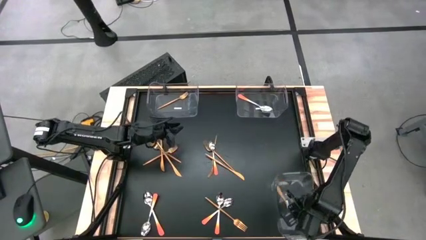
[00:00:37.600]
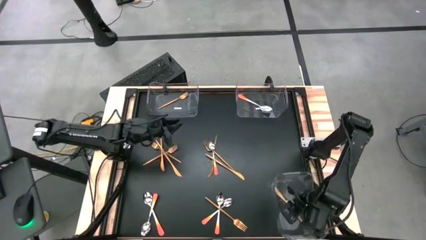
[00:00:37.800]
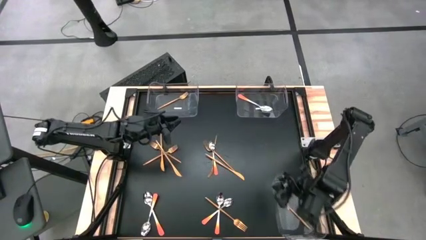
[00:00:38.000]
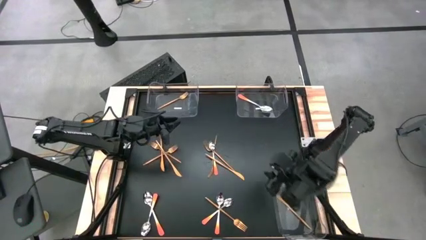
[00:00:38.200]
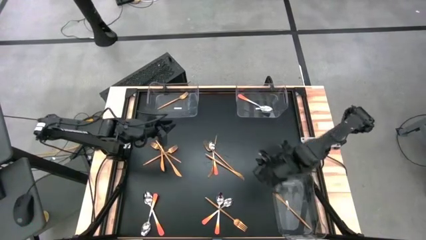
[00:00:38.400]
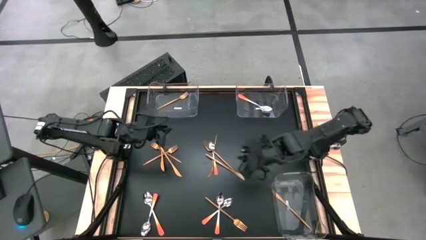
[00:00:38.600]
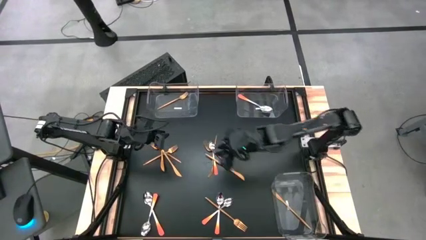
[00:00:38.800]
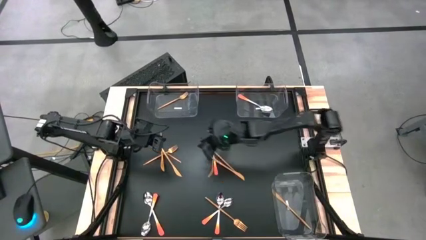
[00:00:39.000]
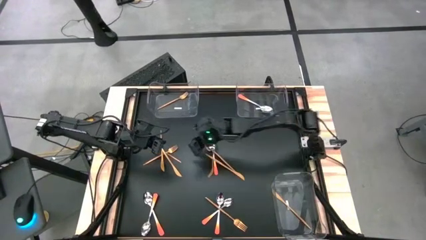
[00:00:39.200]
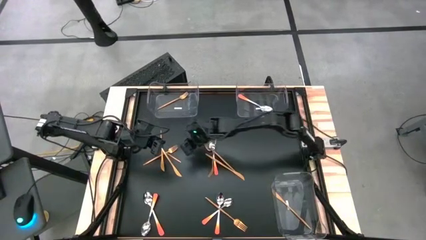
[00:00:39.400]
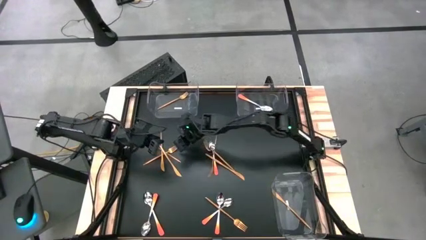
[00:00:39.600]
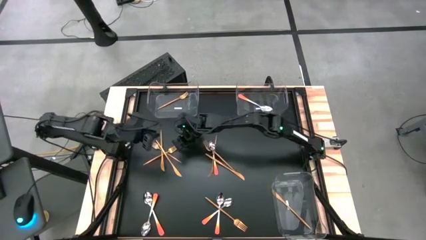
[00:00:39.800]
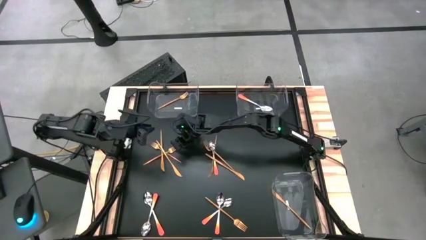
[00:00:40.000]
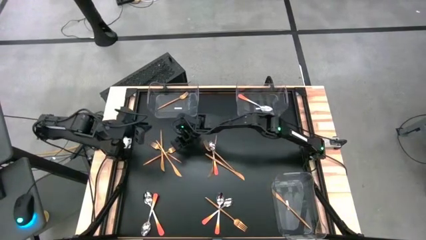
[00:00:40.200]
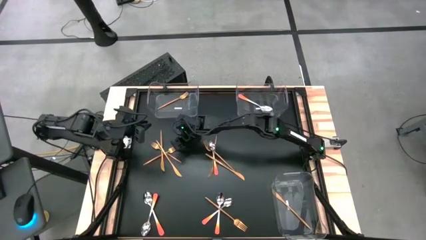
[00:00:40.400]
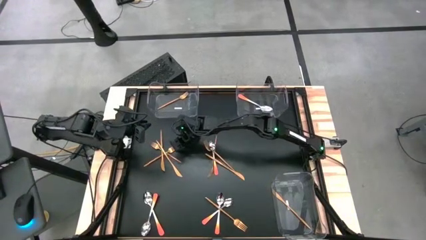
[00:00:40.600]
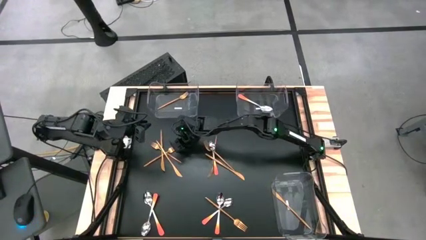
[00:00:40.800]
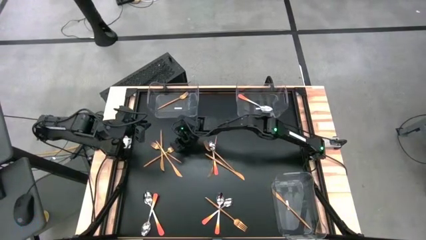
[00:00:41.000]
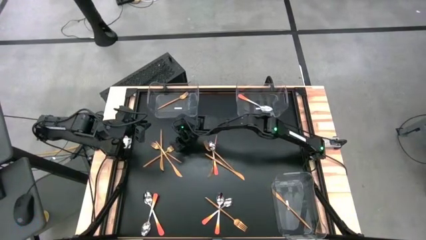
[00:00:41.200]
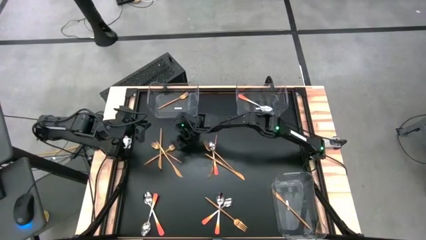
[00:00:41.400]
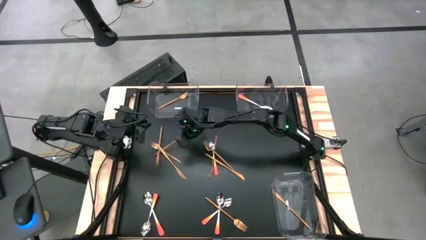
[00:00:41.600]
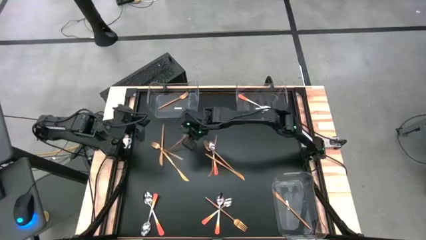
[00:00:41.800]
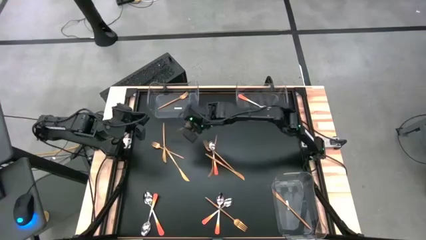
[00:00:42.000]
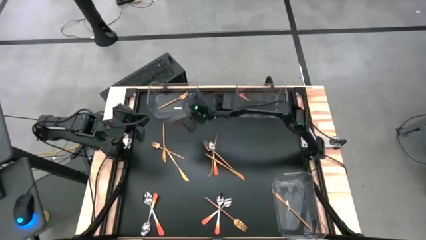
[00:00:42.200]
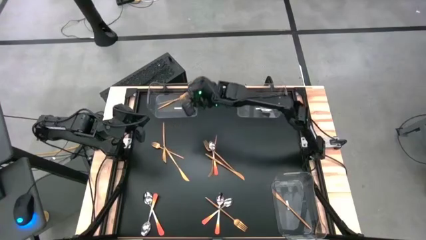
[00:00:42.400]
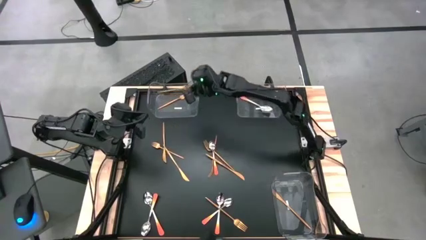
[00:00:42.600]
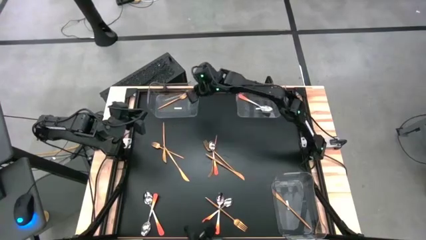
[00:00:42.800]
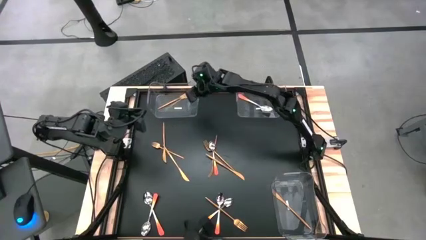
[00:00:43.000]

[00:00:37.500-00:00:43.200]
Task: Sort silverware by color (type)
Put the gold fork into the top left transparent bin

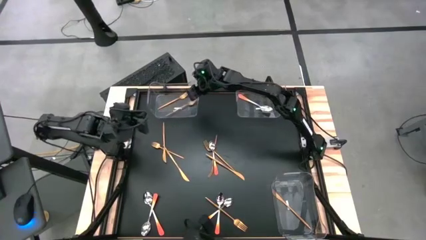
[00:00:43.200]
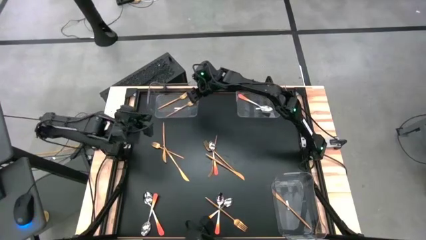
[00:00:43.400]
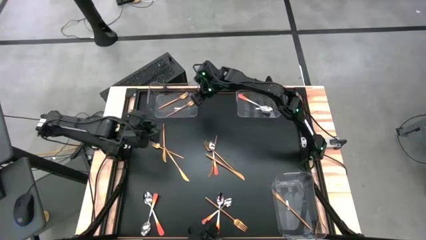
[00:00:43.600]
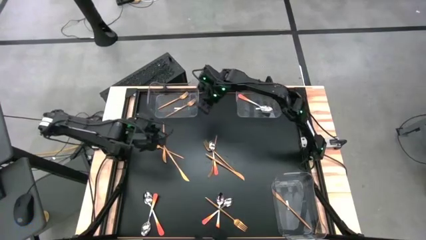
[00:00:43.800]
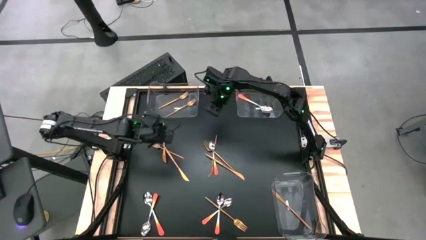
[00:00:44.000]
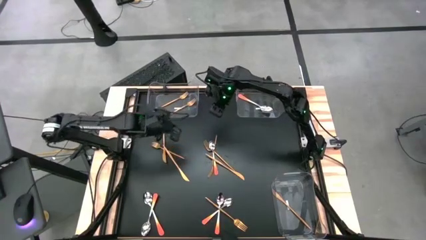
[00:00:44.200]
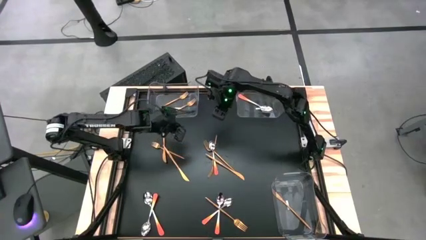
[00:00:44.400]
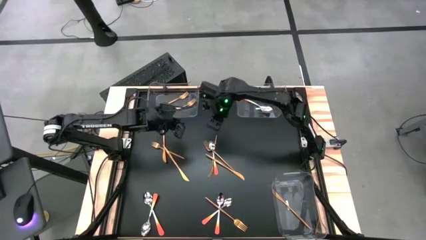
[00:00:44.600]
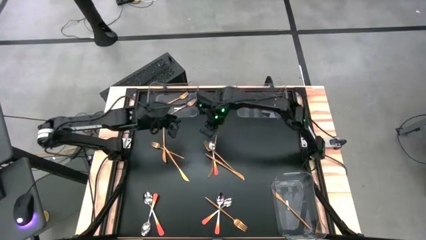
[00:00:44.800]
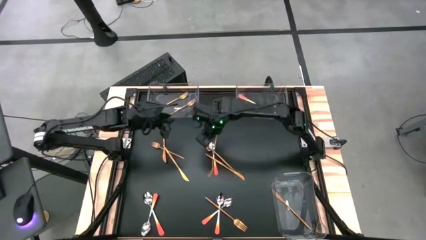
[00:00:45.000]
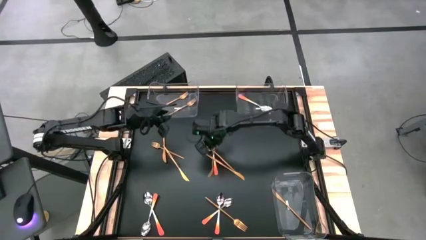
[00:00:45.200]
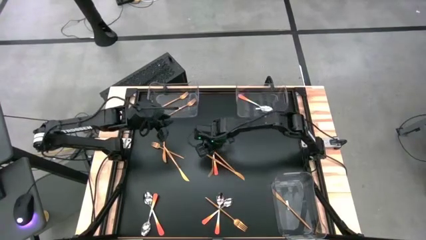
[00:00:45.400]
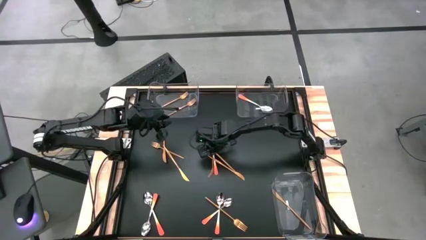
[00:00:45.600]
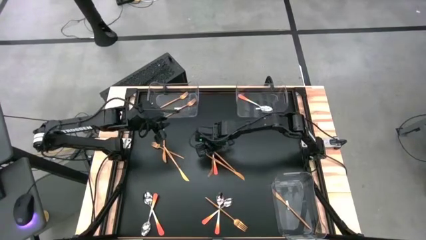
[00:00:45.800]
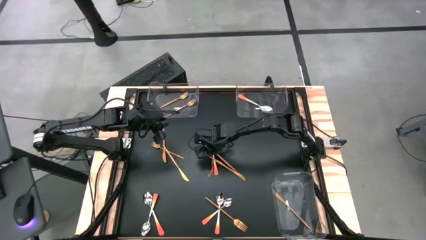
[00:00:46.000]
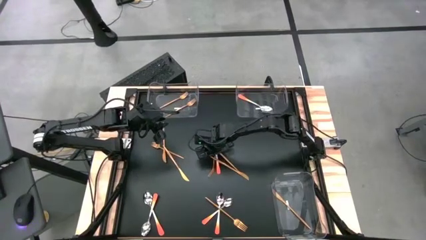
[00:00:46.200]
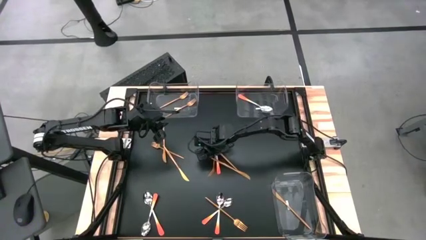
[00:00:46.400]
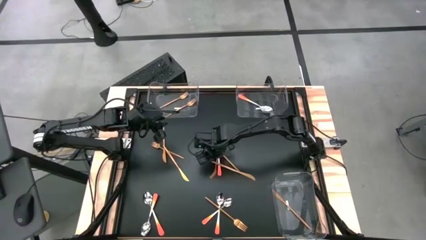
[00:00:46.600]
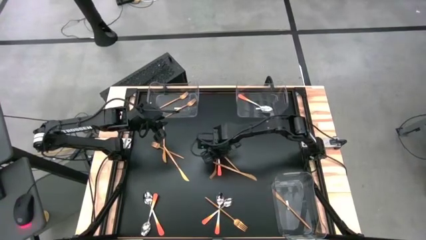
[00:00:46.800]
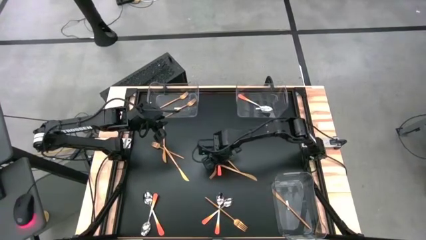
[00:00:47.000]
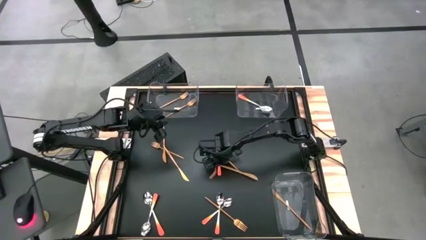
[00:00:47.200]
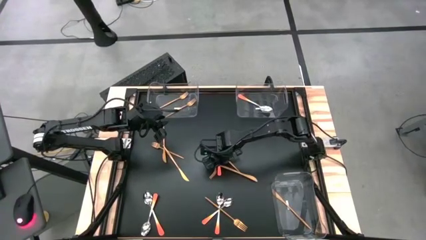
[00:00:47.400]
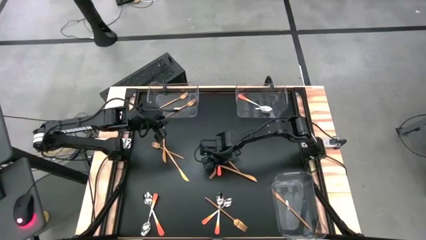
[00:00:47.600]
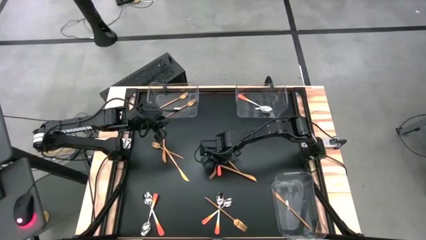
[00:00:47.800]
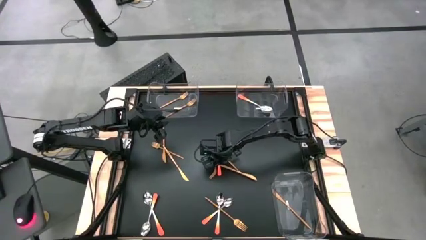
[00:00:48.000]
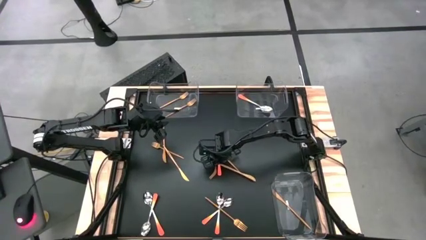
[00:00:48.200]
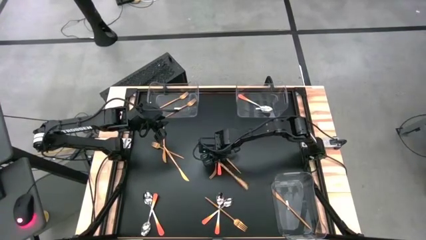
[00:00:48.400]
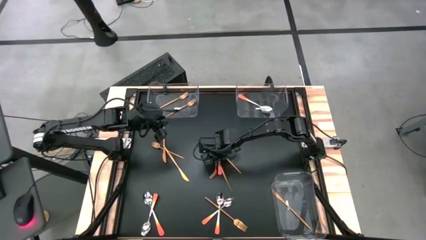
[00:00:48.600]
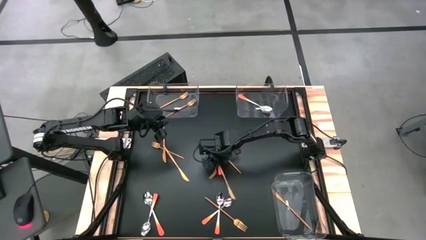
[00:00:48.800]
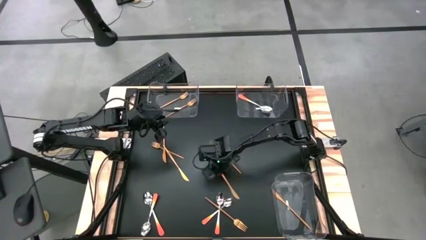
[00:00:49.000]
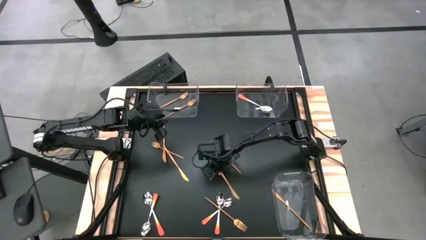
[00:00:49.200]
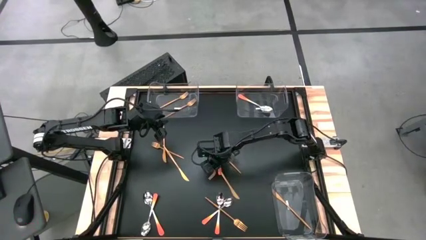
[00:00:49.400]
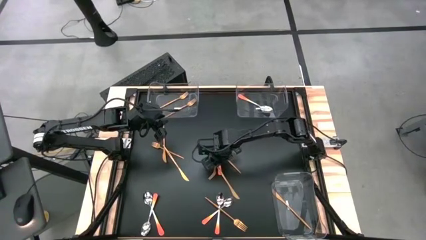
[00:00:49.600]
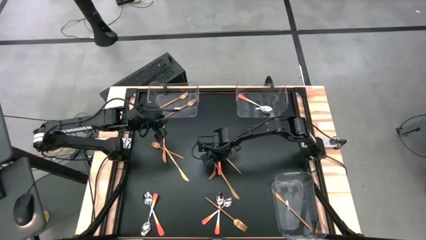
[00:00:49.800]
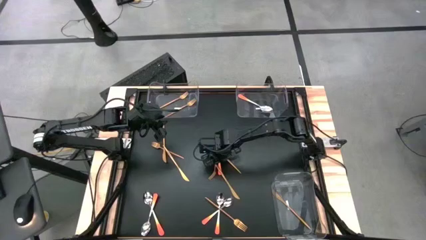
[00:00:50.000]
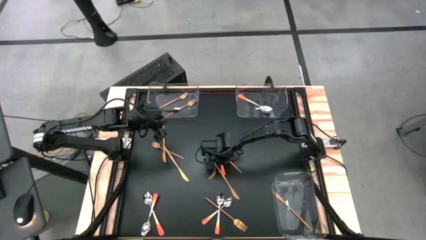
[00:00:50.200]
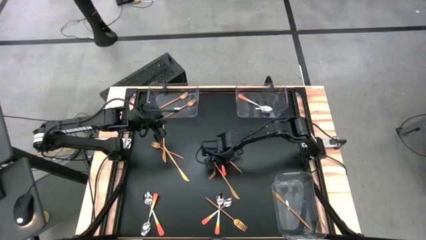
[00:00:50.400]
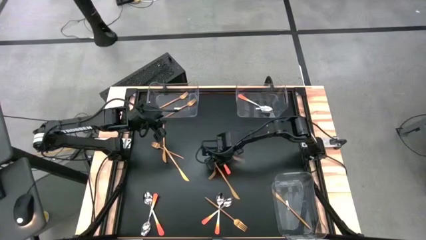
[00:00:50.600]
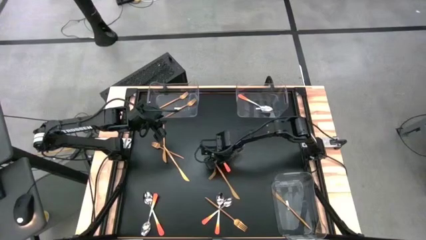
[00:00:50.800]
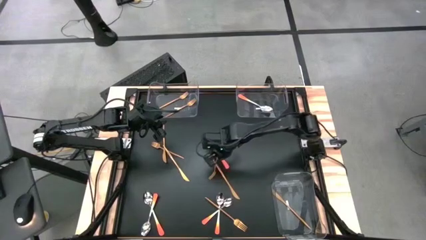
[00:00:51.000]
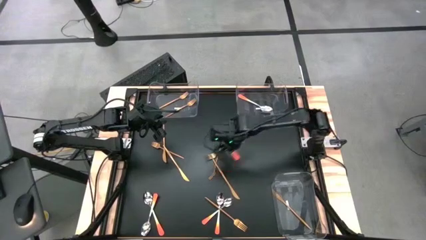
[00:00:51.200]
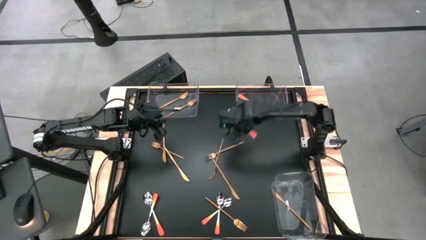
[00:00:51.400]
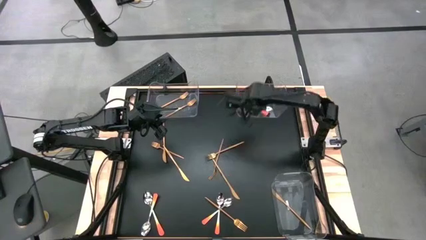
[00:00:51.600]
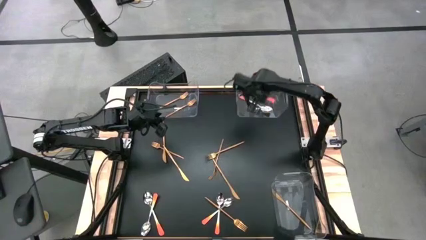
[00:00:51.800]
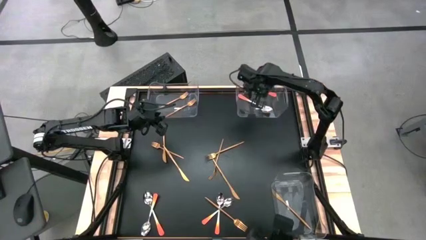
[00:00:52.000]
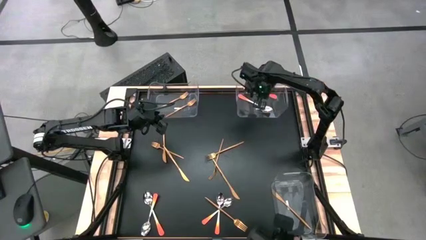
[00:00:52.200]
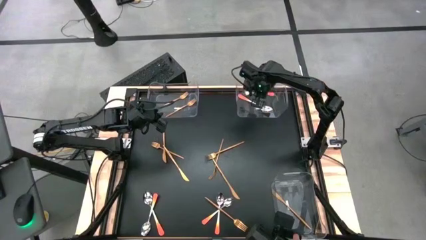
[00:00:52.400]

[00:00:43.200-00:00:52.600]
Put the orange spoon into the top right transparent bin

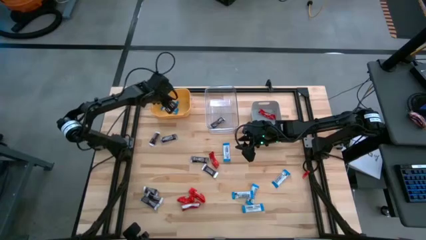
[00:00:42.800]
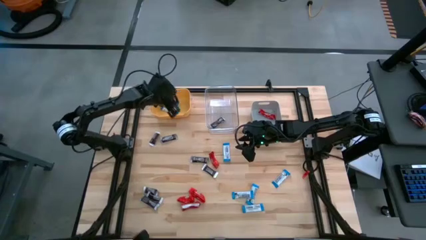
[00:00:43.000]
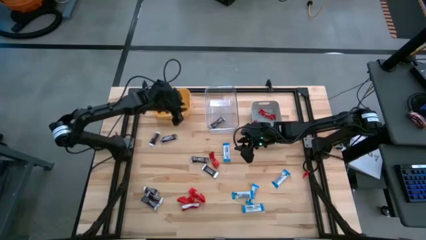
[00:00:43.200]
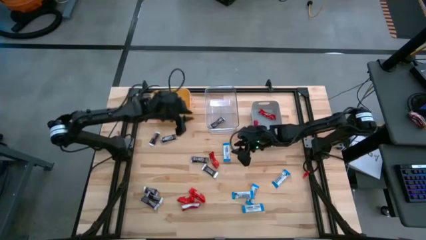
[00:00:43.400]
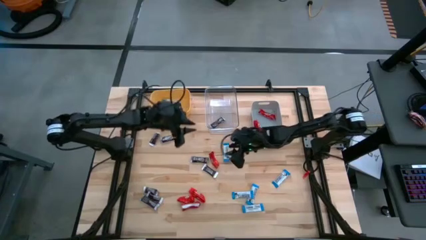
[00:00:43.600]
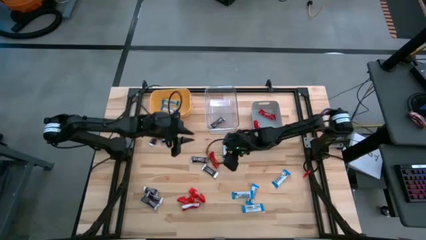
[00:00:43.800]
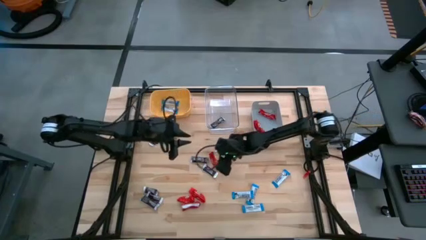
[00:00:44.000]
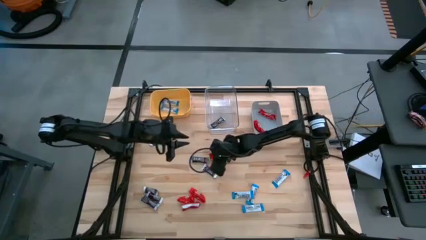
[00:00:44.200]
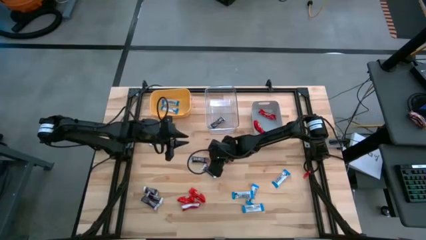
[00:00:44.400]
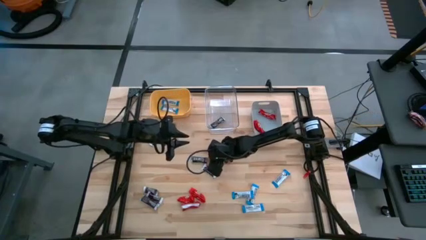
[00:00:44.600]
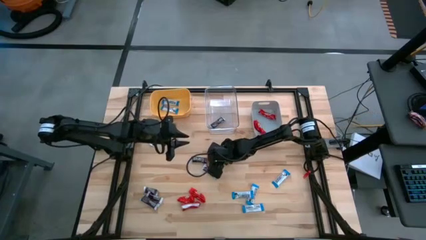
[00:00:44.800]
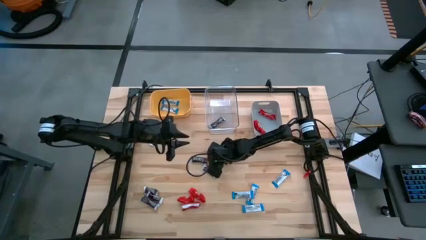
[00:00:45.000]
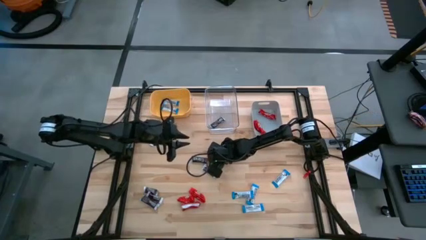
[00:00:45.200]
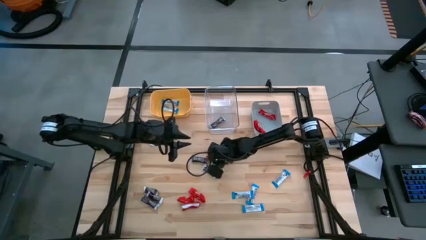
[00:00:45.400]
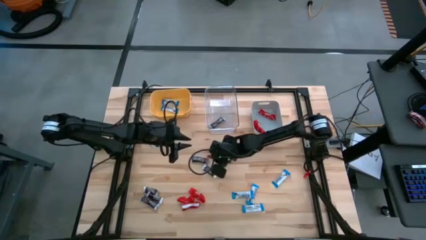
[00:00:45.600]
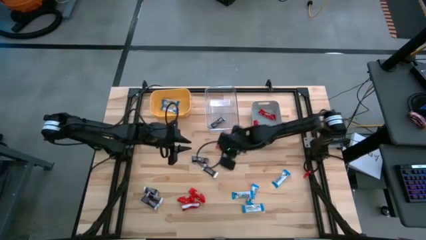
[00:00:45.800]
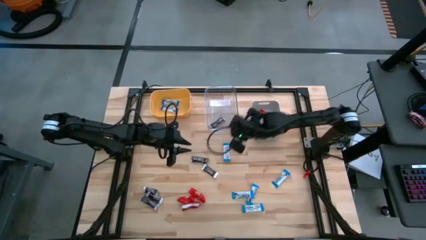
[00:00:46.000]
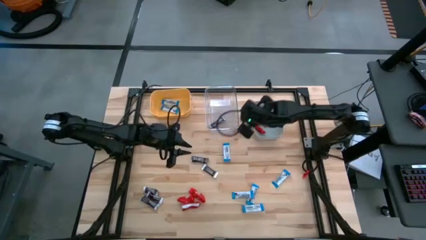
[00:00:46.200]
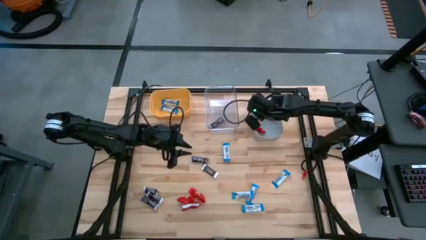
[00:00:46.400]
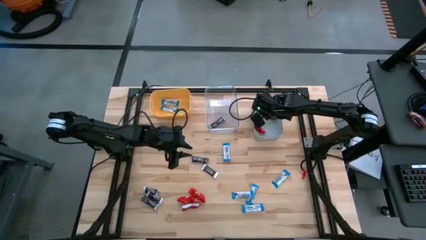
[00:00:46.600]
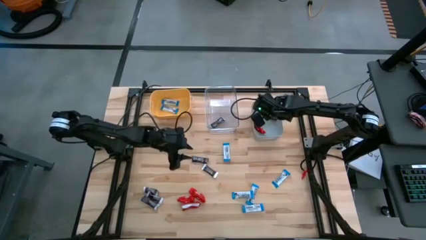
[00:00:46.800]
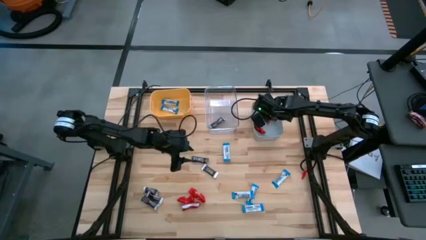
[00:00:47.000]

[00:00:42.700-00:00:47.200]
Task: Sort candy
Put the red chocolate into the gray bin
